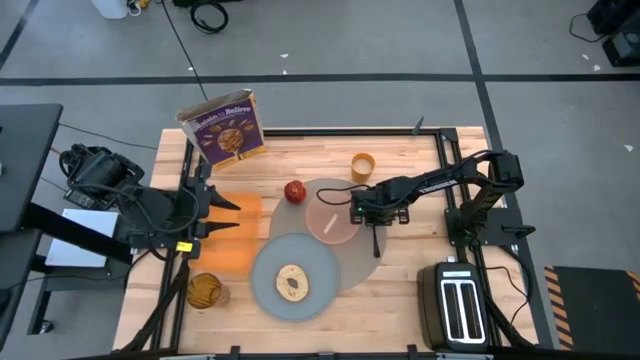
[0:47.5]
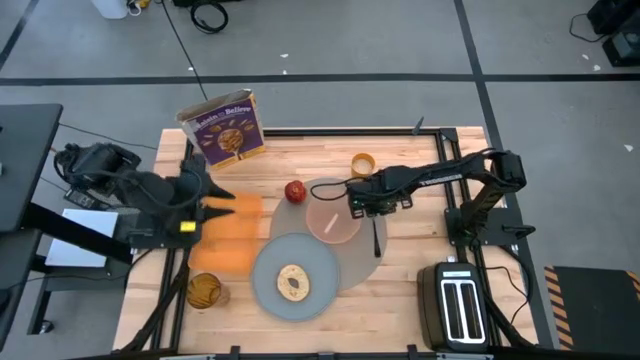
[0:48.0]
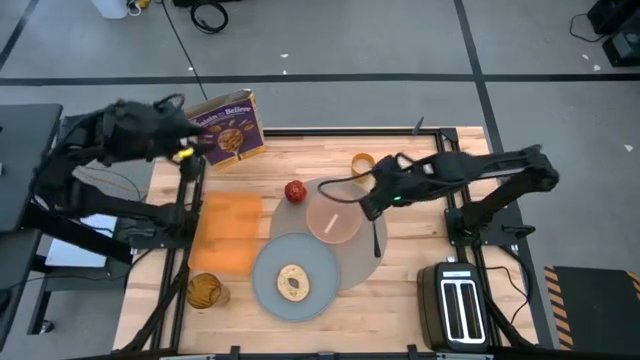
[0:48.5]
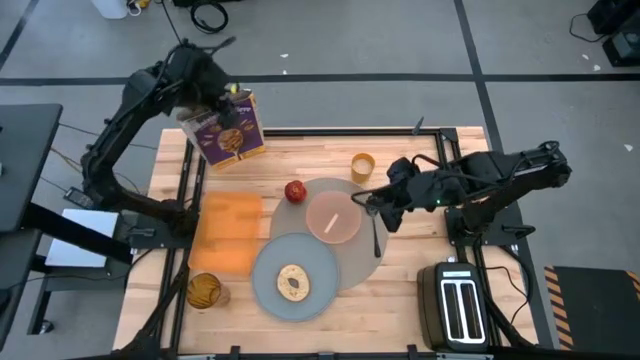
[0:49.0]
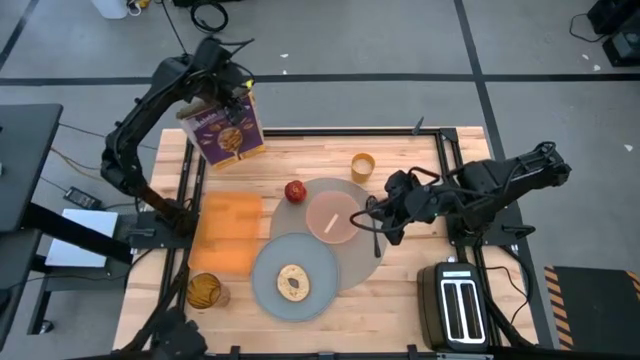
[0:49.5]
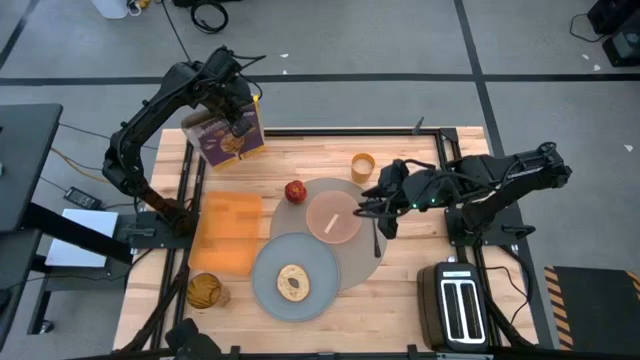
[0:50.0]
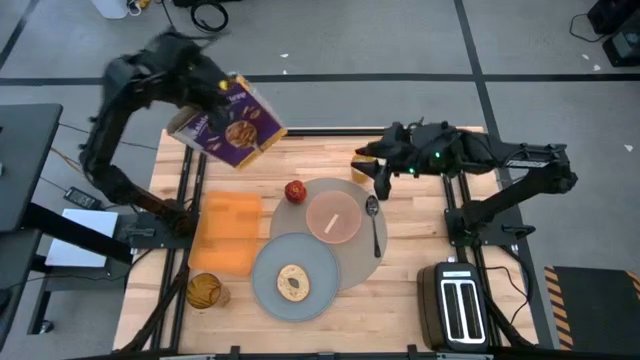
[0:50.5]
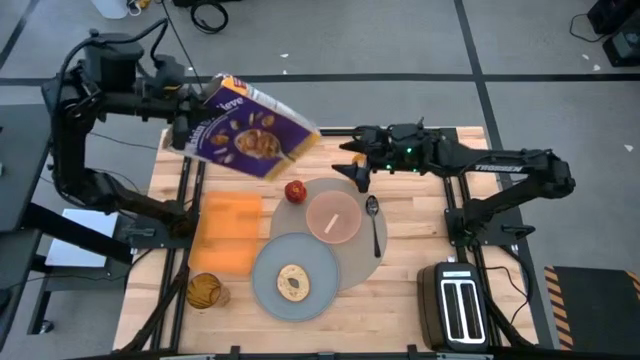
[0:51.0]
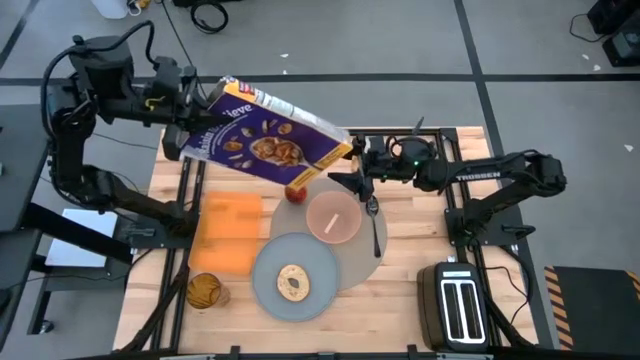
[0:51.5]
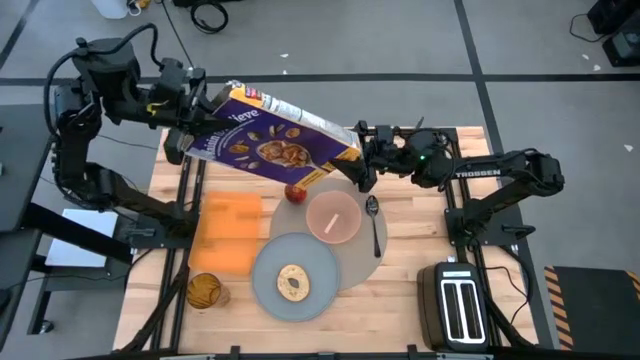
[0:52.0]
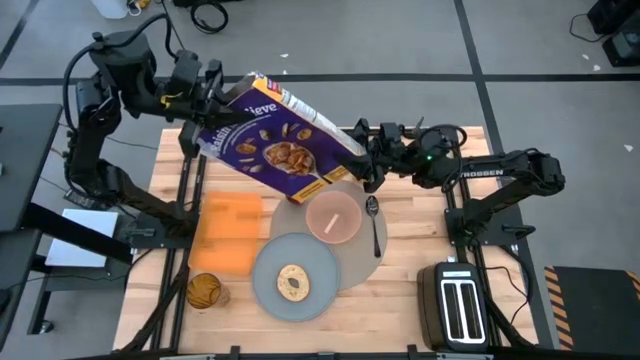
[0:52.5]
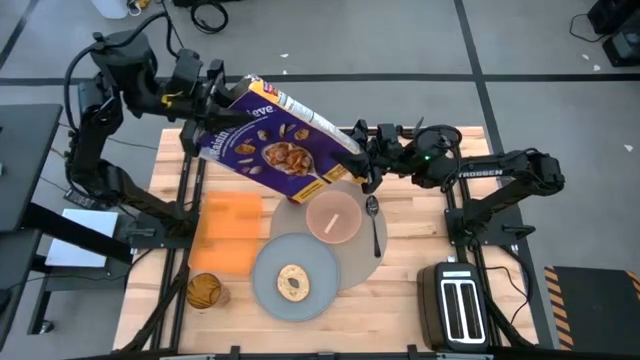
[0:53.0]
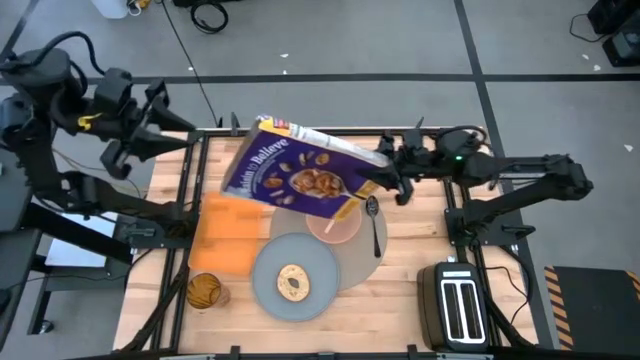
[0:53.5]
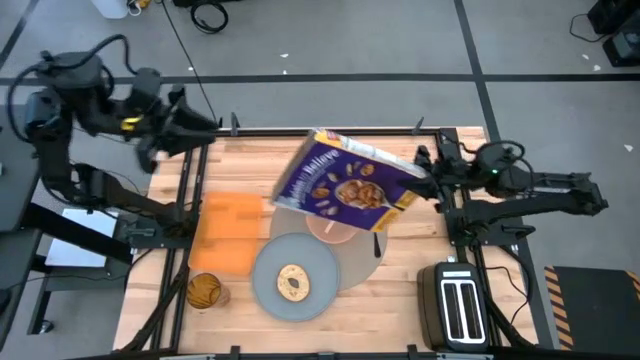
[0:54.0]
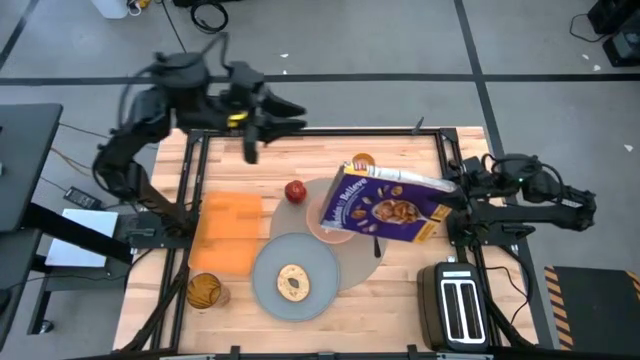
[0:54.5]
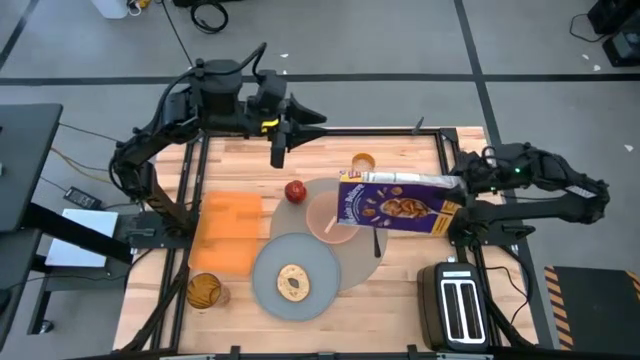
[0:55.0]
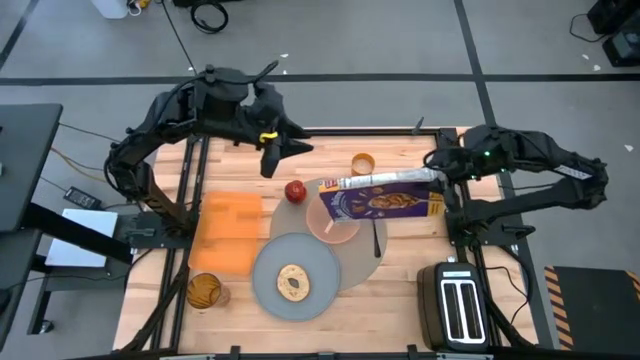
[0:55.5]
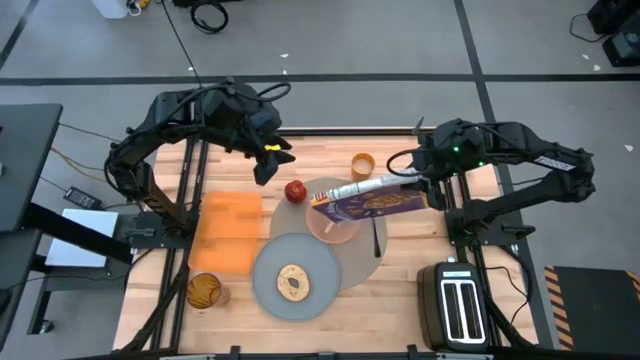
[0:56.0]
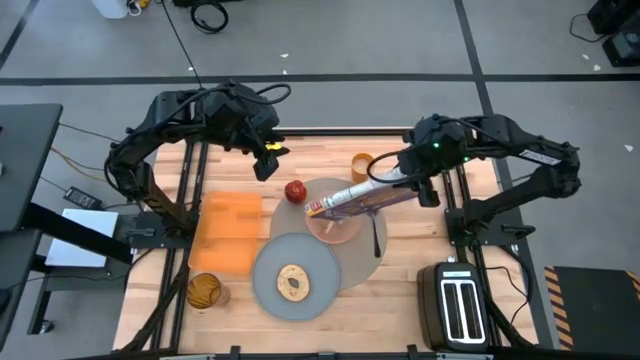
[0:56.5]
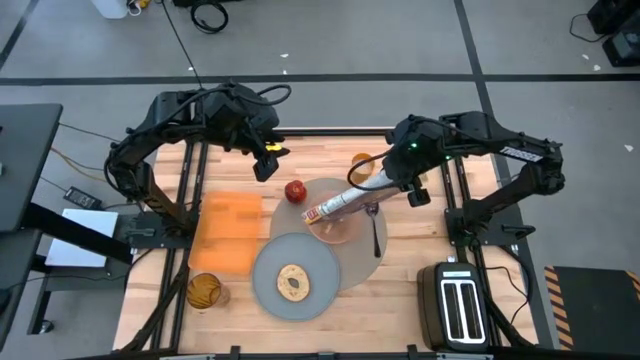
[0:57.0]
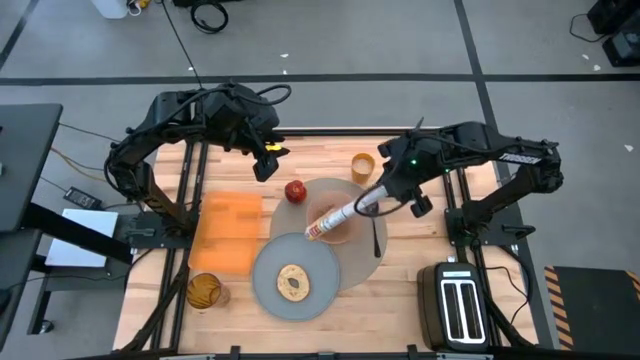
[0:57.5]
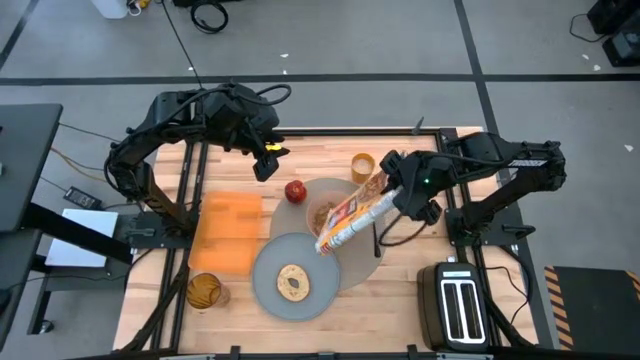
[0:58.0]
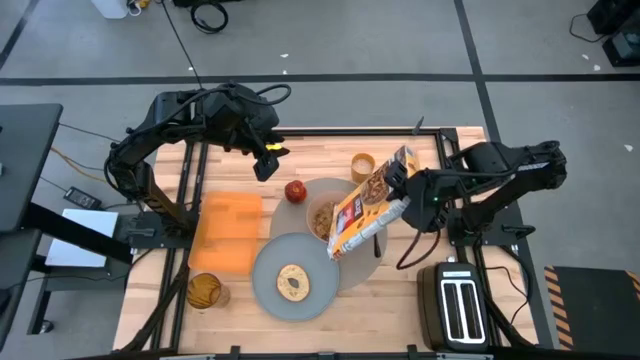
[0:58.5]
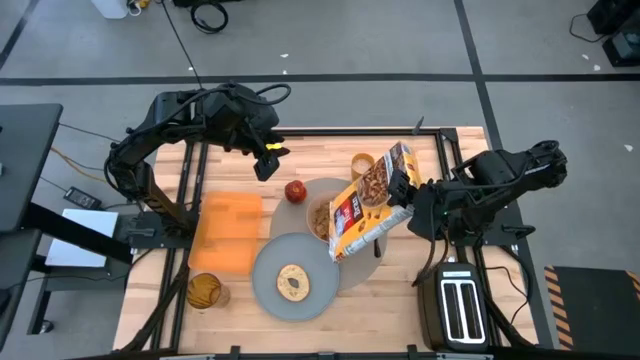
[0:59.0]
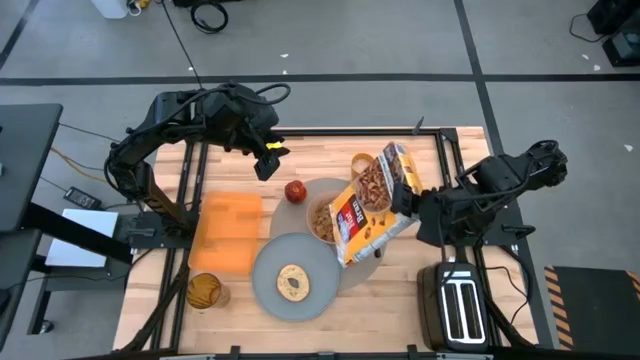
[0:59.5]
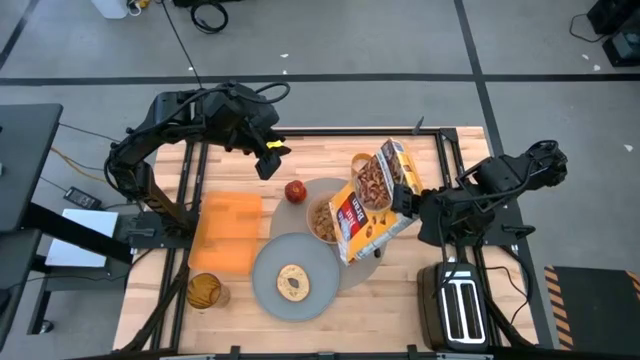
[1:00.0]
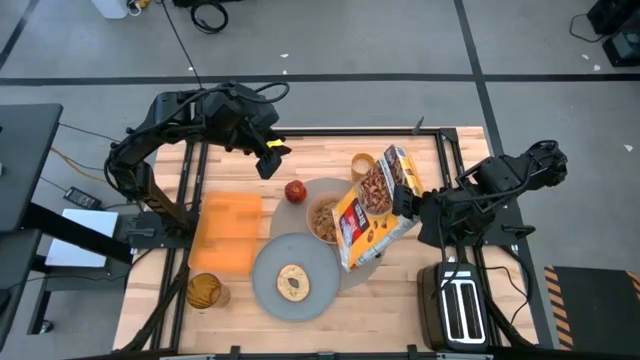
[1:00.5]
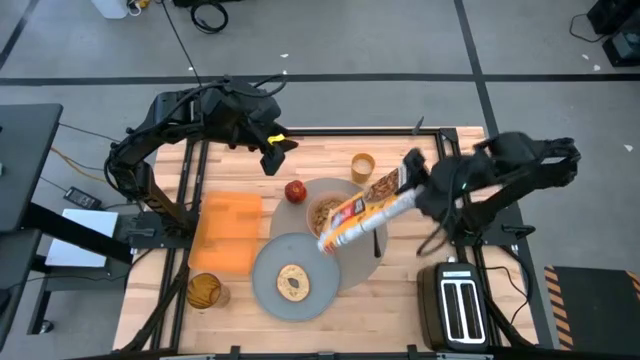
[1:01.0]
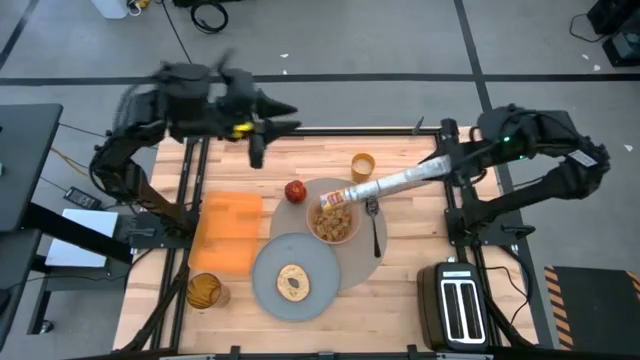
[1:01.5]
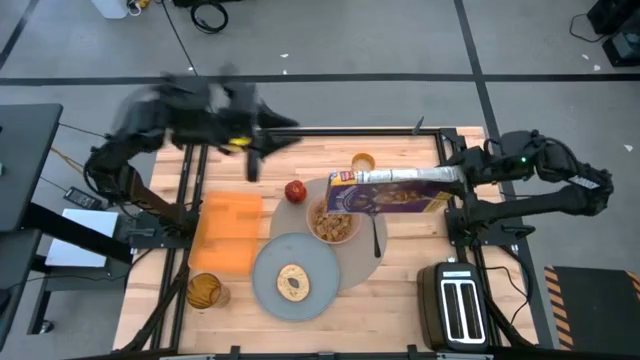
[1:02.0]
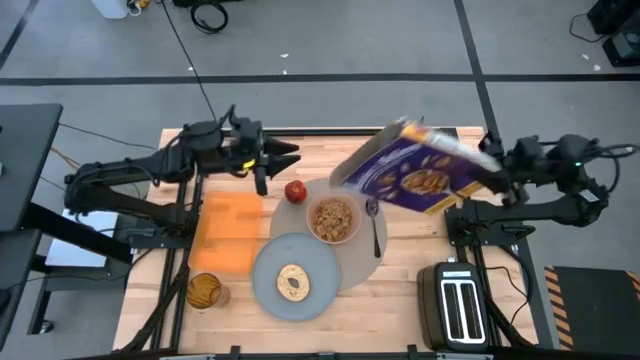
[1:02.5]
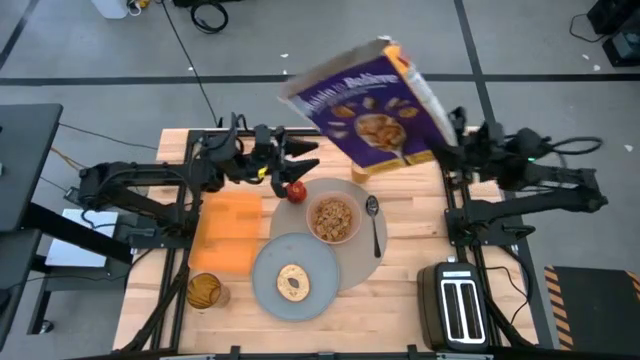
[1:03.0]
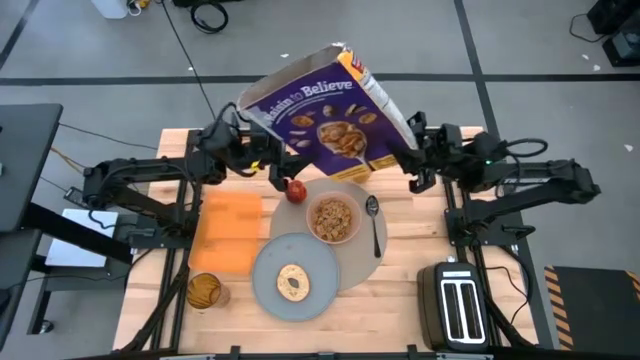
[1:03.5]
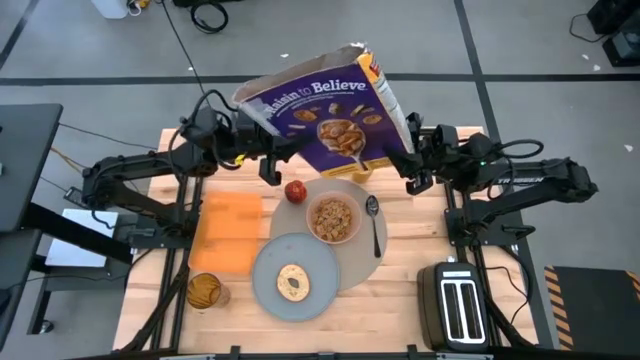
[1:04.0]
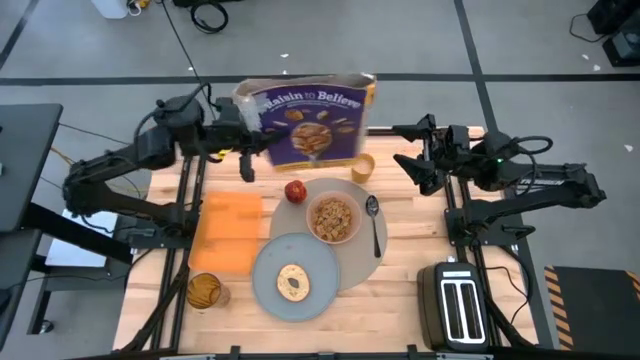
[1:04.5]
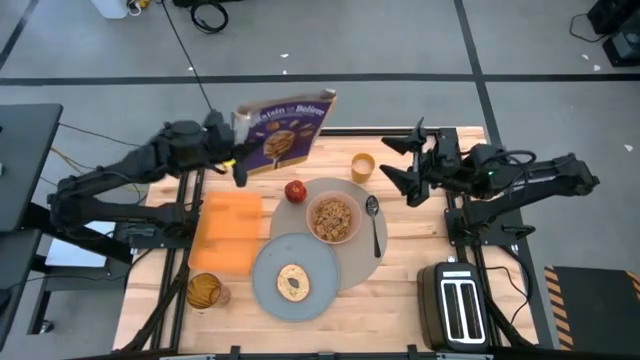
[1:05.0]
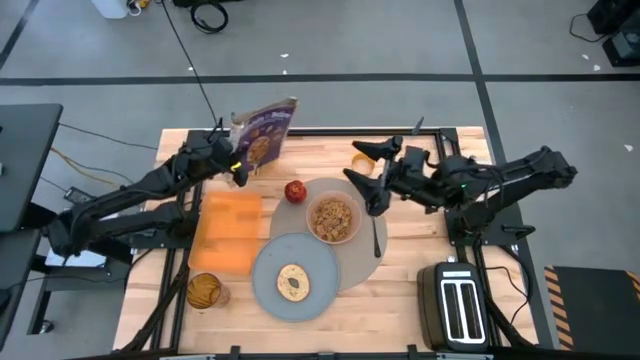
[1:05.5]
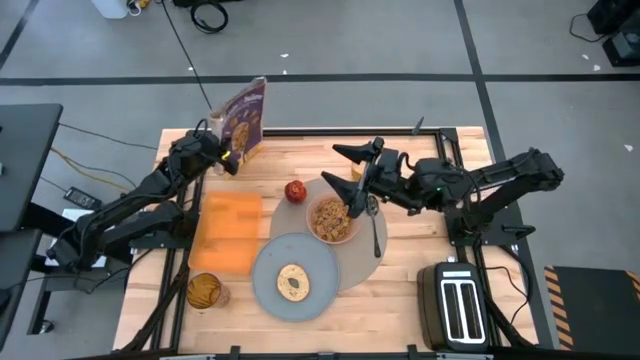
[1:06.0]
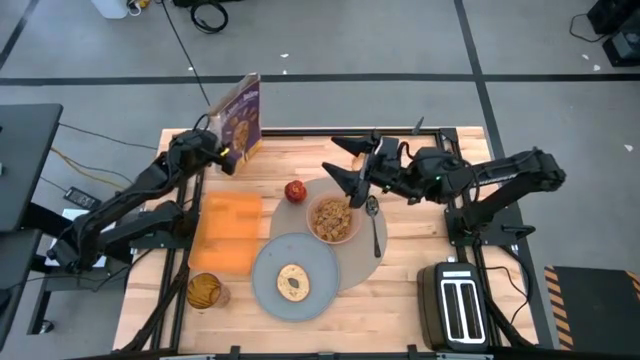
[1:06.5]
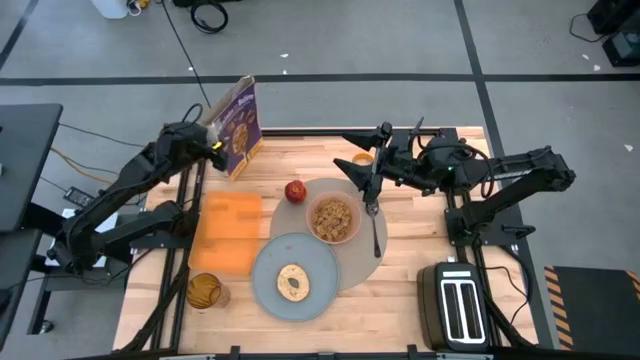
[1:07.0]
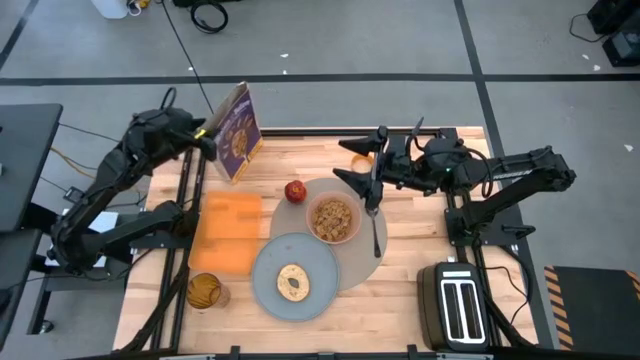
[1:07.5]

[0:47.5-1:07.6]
Task: Arrange a breakfast setting
Pour the cereal from the cereal box into a pink bowl

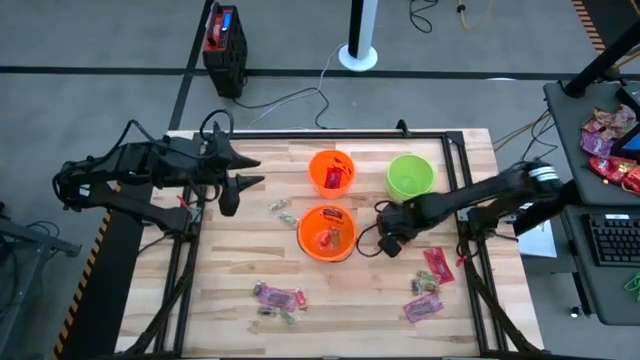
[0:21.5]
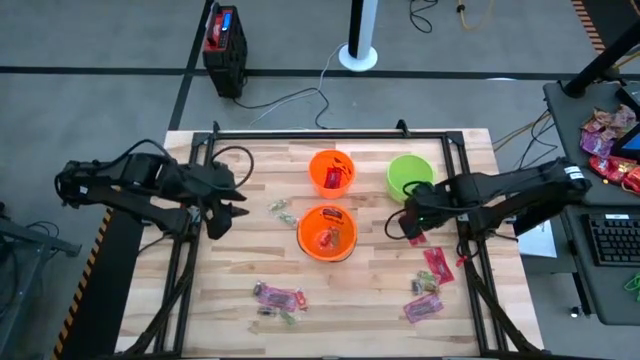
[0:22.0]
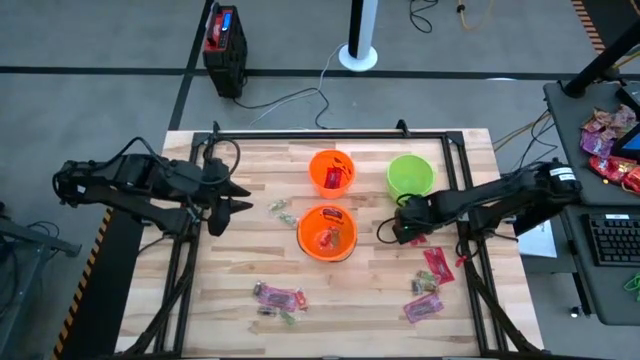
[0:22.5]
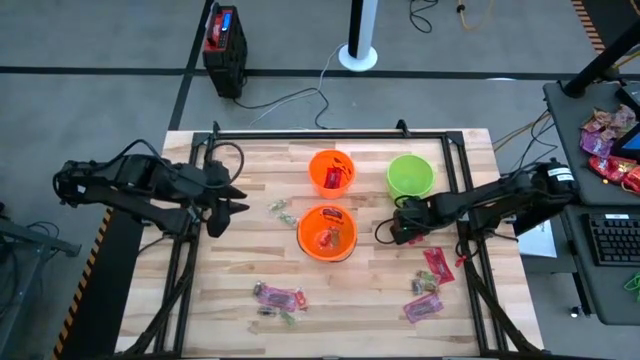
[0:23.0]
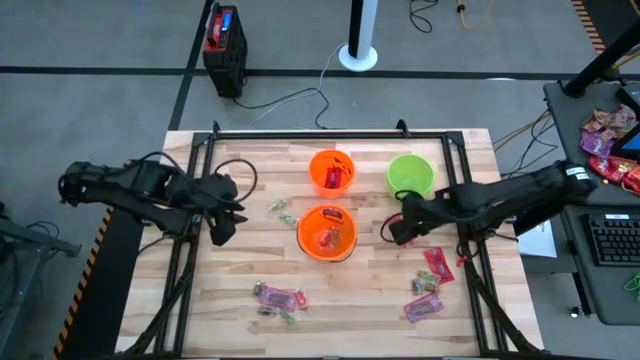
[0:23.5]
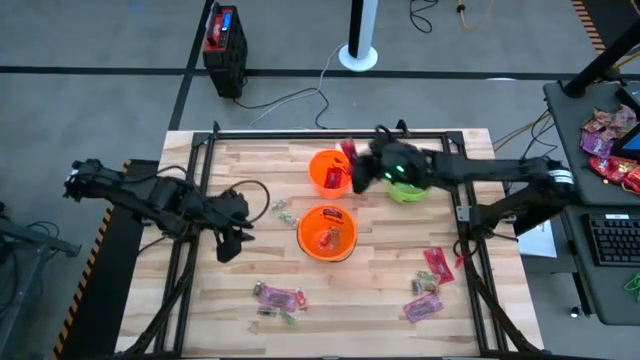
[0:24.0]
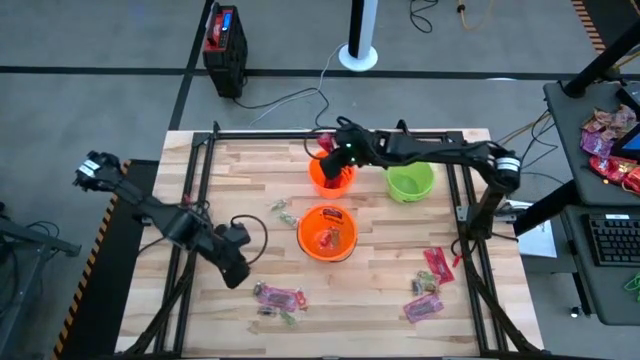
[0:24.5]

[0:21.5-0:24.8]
Task: Sort candy by brand, put in halloween buckets
Put the top red candy into the top orange bin
